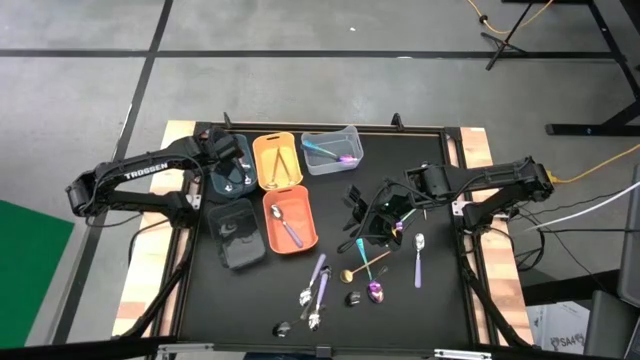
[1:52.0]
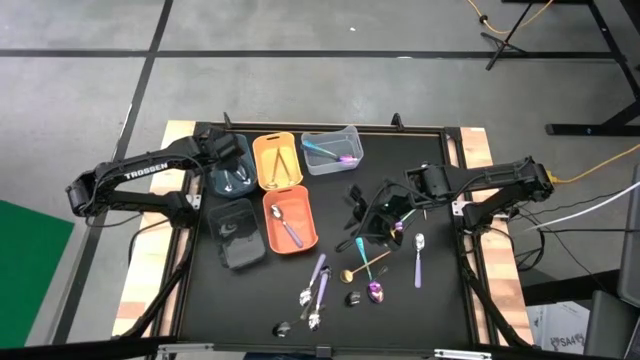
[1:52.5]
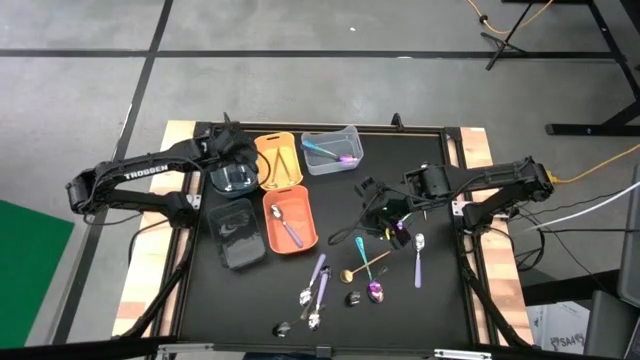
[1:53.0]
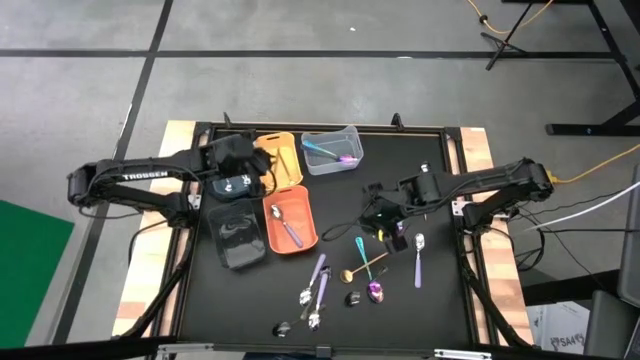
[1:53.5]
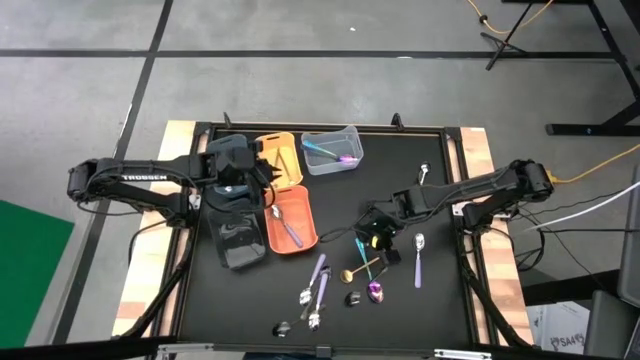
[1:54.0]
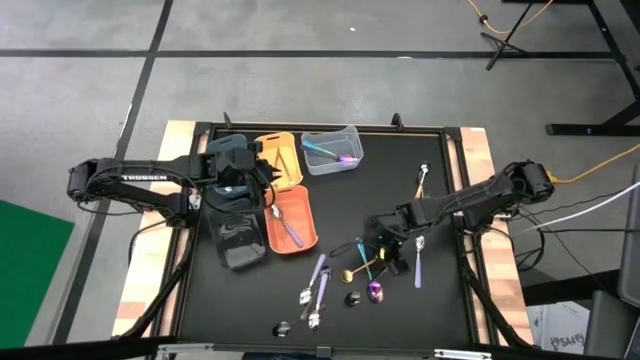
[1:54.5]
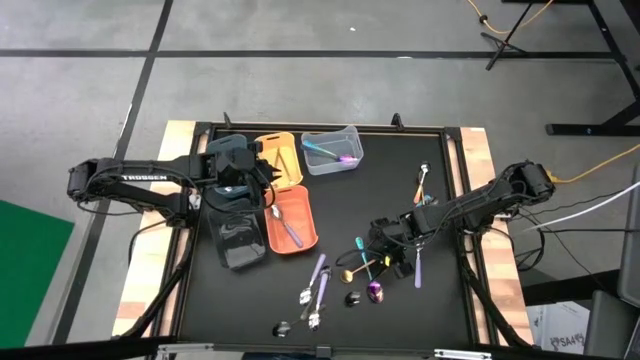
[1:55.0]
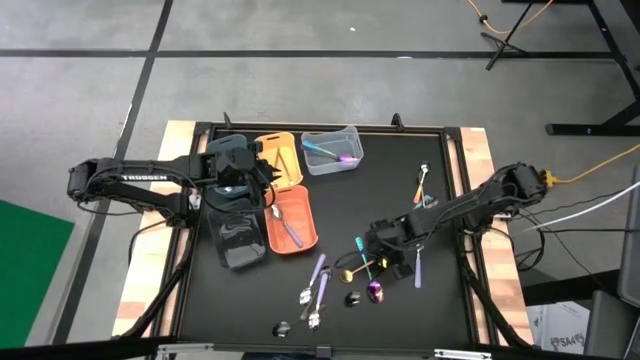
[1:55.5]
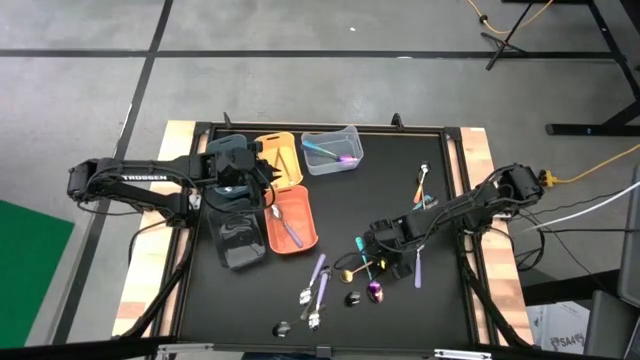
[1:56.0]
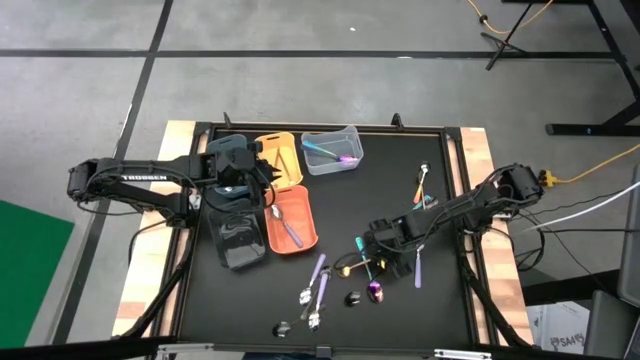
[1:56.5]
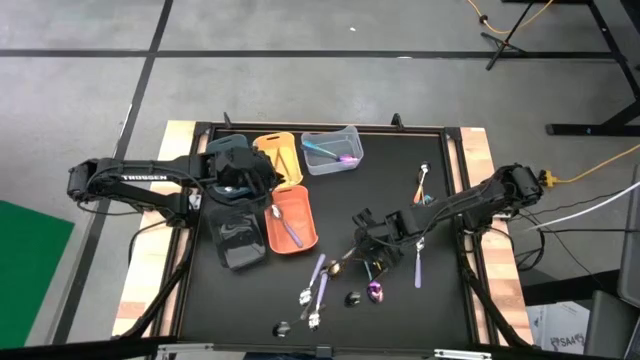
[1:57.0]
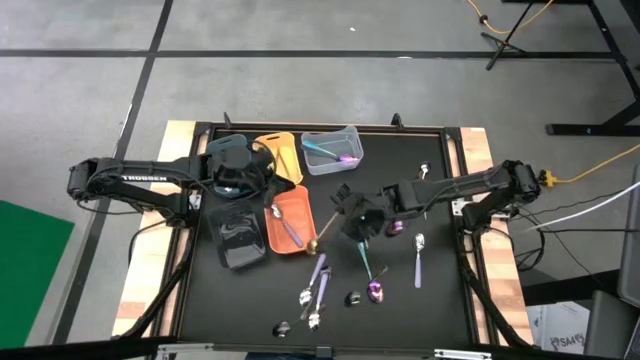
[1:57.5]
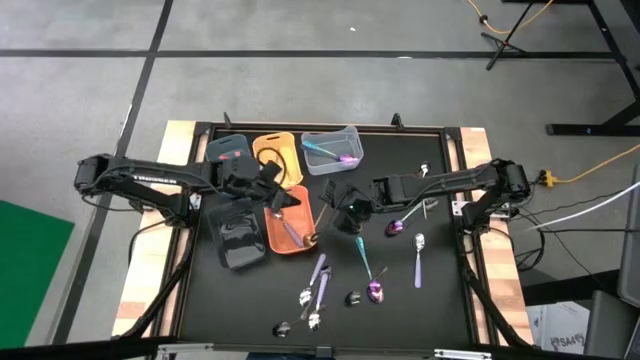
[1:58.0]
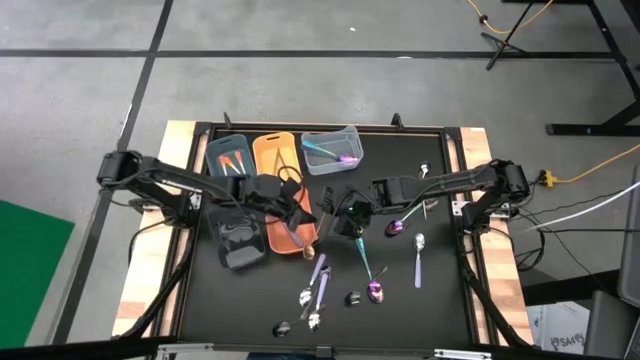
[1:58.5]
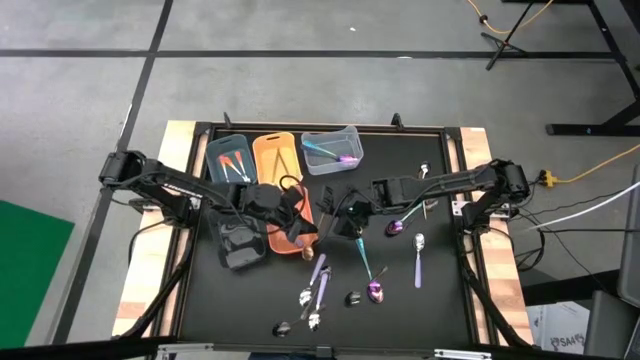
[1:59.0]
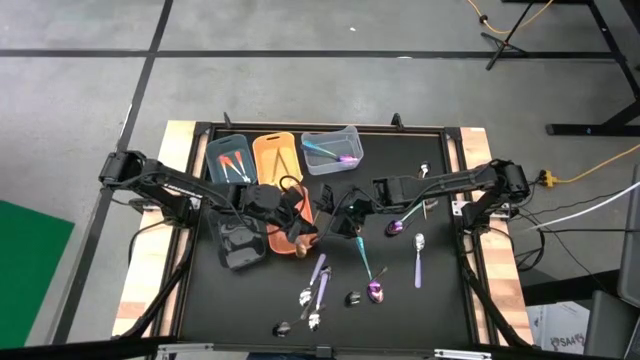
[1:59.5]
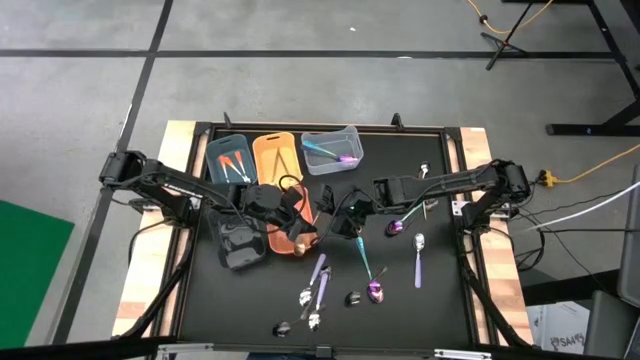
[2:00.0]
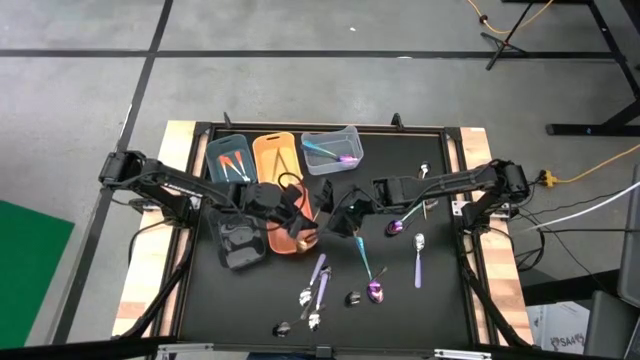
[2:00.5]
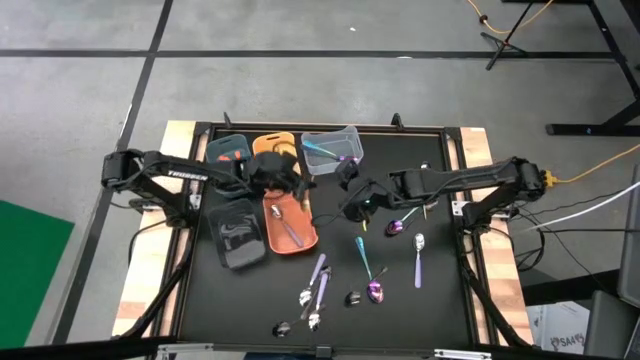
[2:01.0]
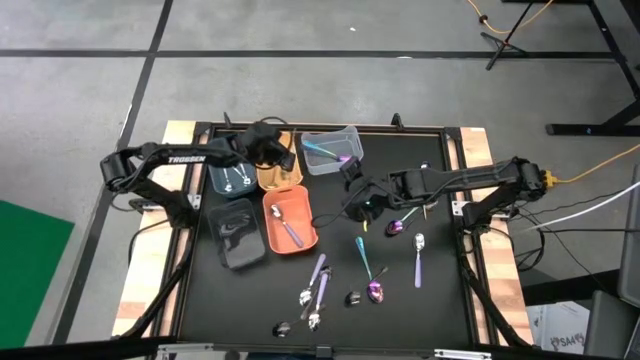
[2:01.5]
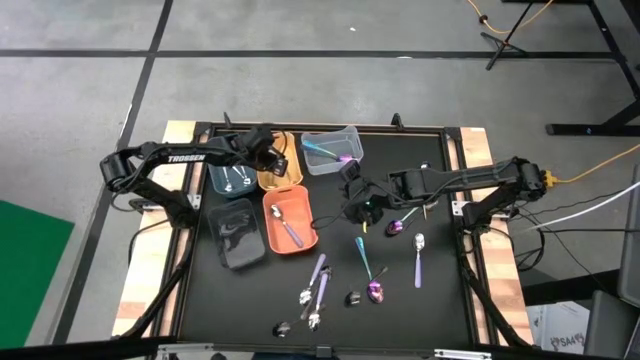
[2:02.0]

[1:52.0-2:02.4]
Task: Sort silverware by color (type)
Put the gold spoon into the yellow bin

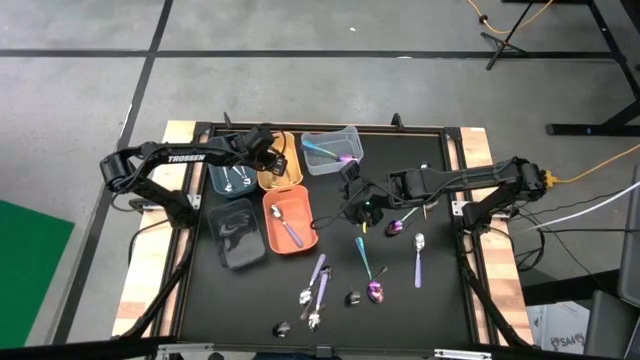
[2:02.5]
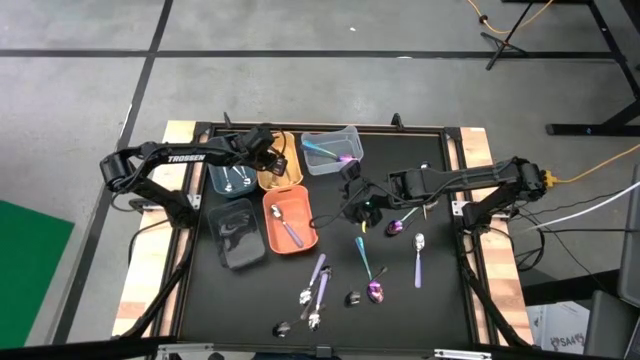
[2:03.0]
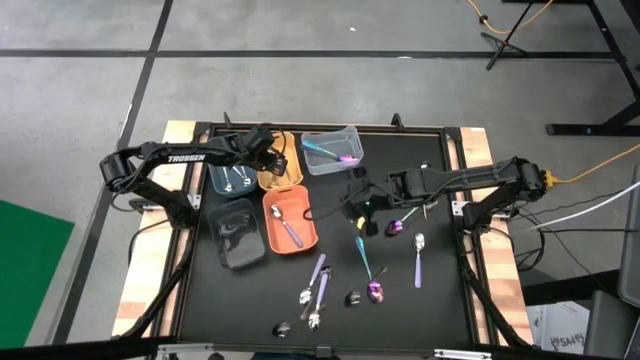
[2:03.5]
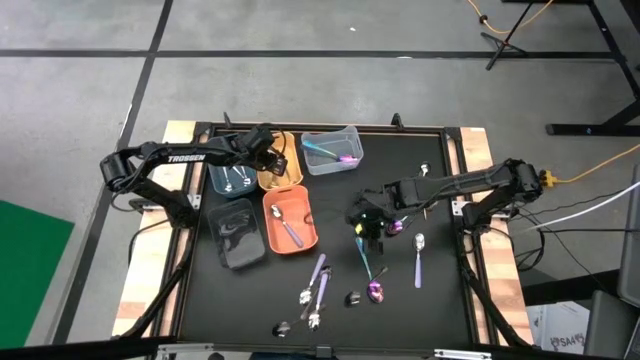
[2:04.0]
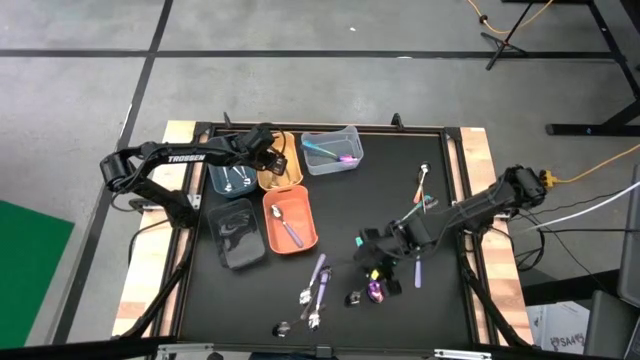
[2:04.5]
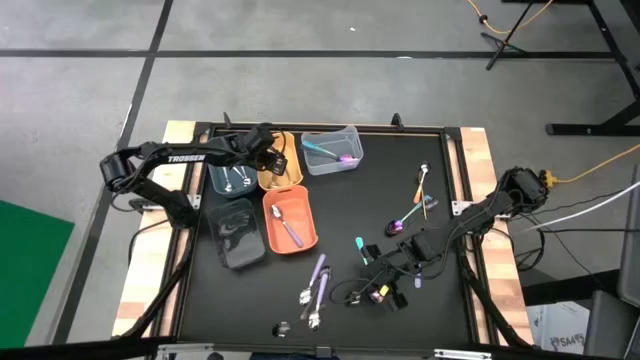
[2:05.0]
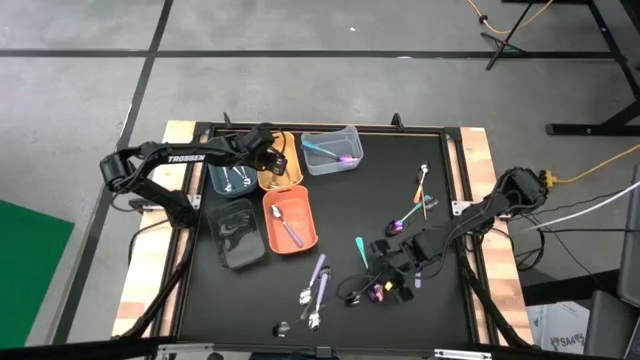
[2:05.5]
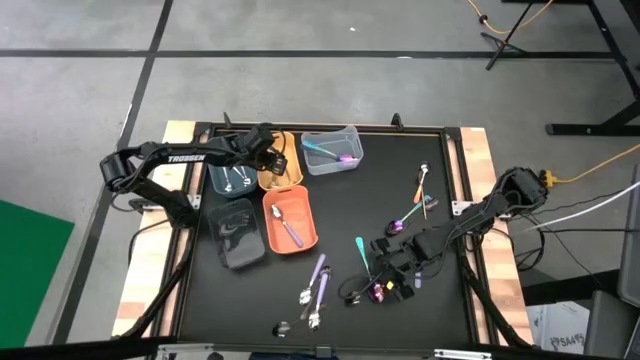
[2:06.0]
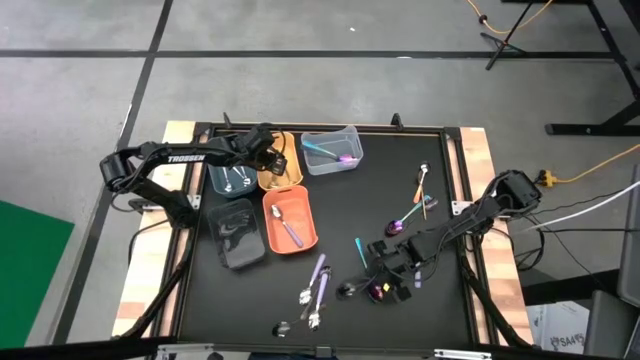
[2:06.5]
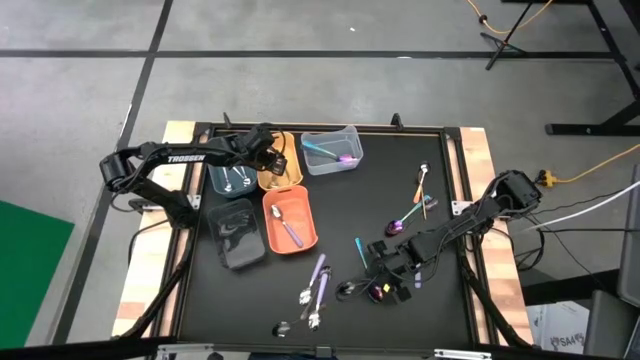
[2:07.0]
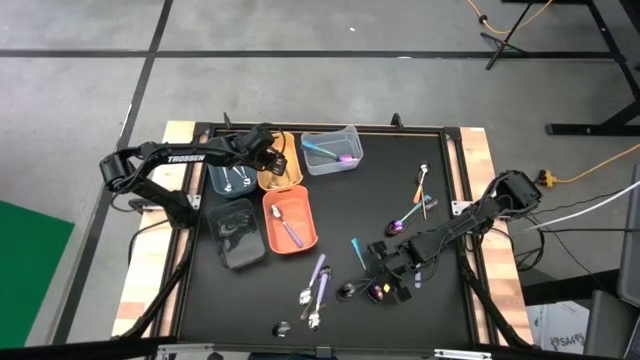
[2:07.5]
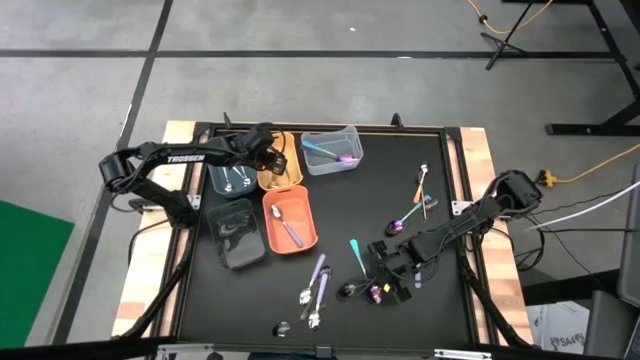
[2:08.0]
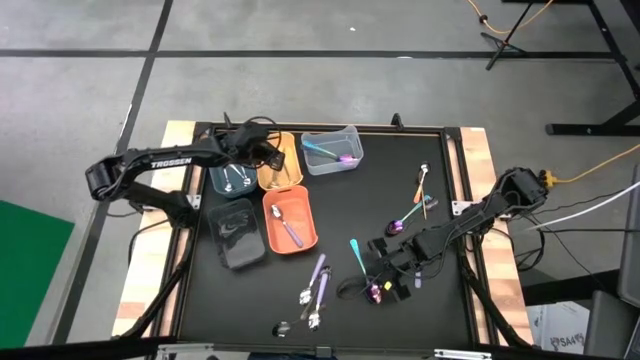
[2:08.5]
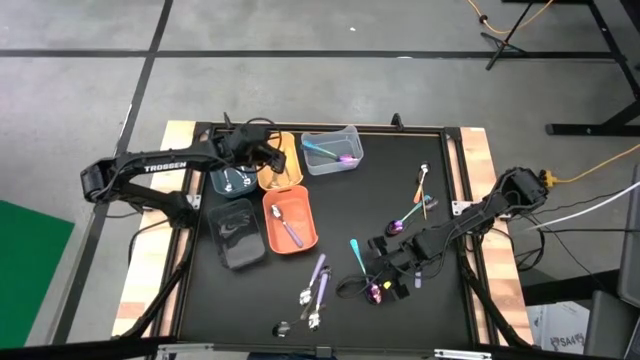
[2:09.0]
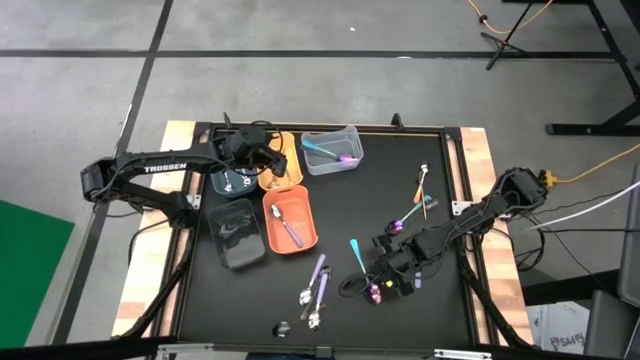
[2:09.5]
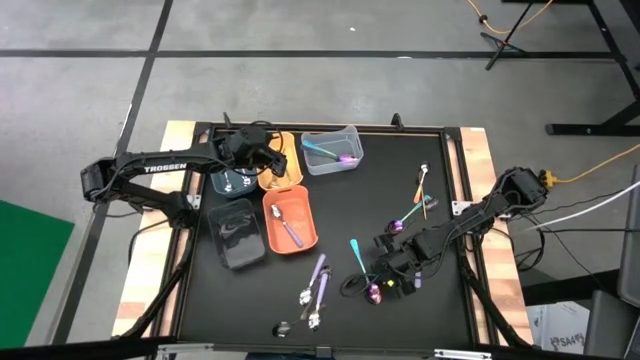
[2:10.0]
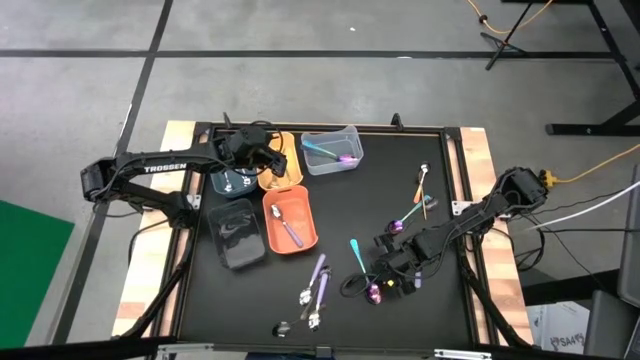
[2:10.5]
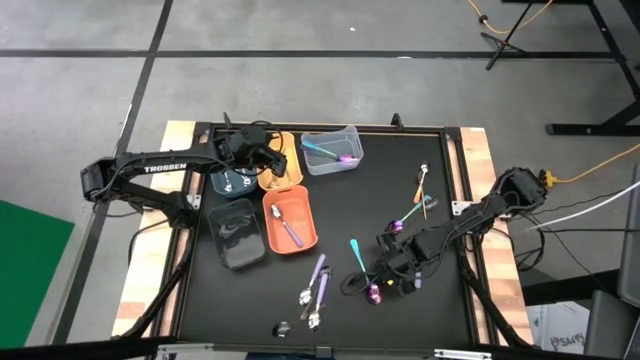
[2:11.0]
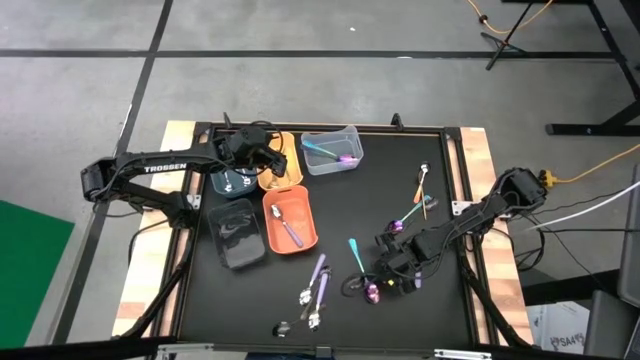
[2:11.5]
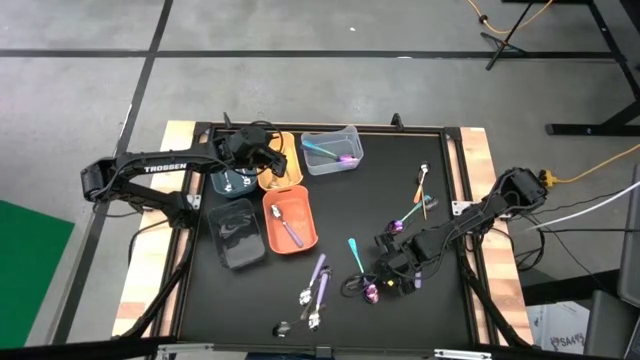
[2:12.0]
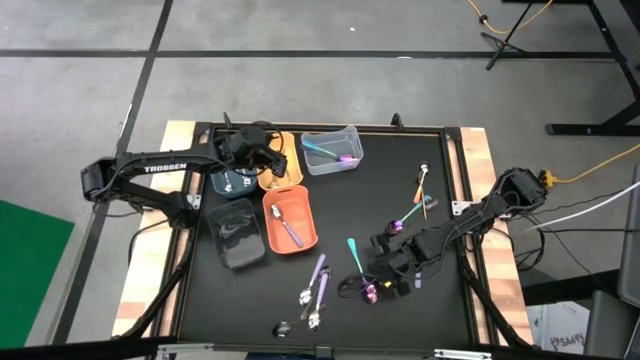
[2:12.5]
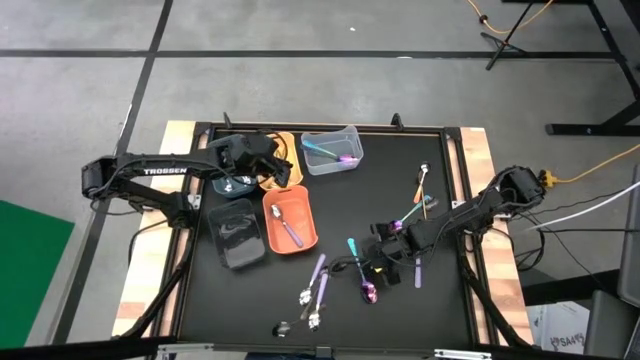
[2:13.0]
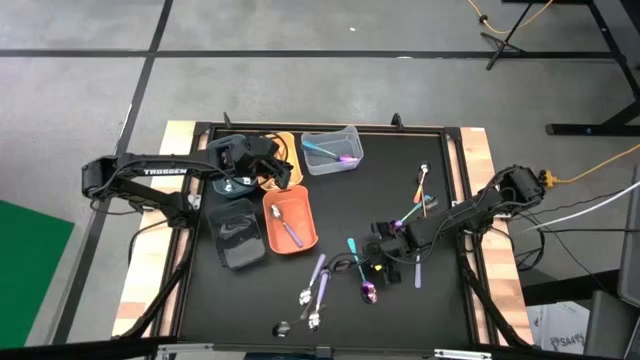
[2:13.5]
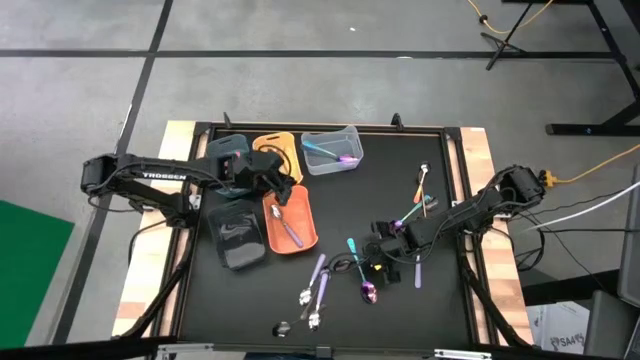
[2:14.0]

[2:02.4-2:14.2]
Put the black spoon into the black bin
